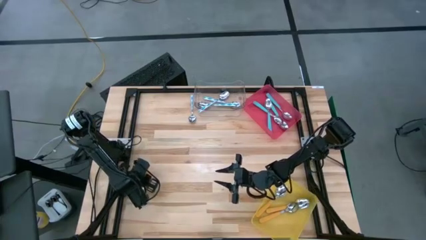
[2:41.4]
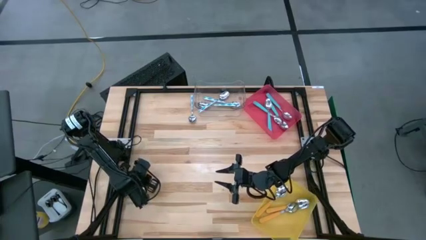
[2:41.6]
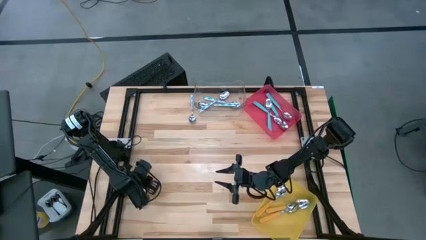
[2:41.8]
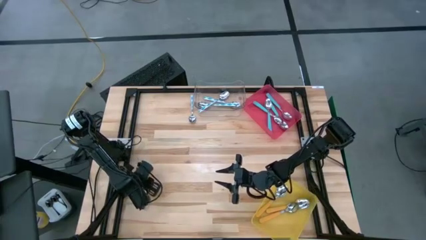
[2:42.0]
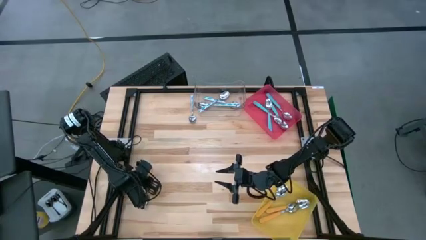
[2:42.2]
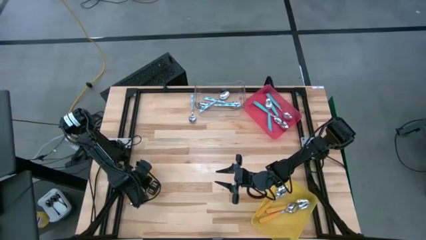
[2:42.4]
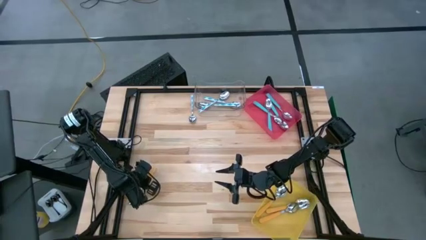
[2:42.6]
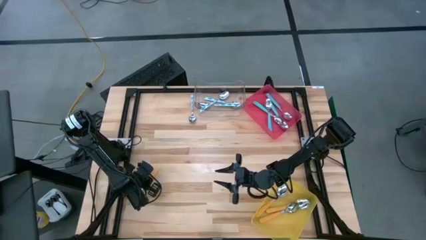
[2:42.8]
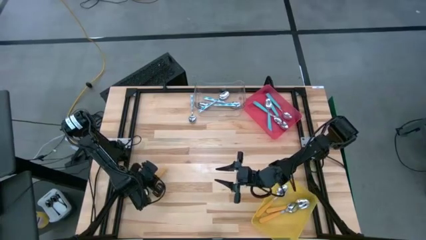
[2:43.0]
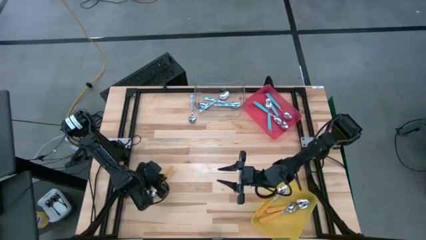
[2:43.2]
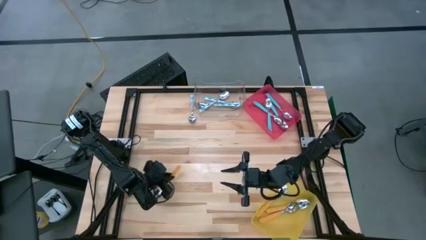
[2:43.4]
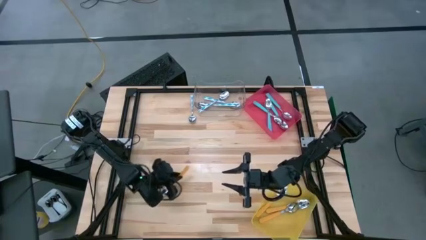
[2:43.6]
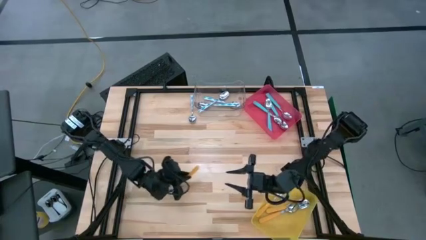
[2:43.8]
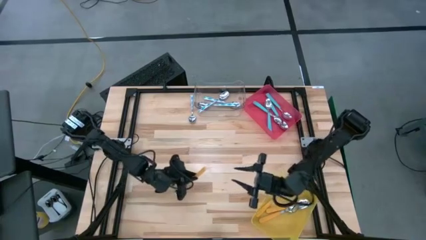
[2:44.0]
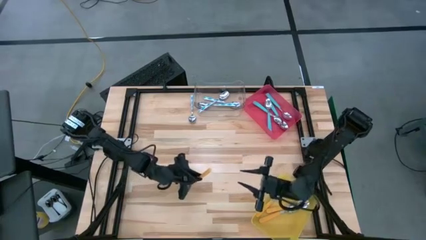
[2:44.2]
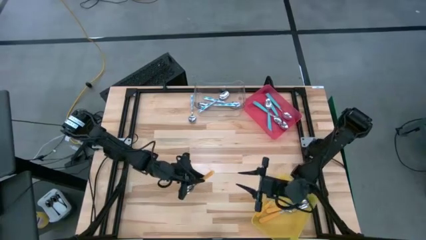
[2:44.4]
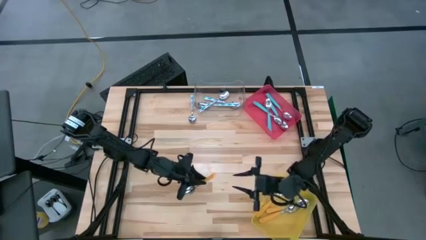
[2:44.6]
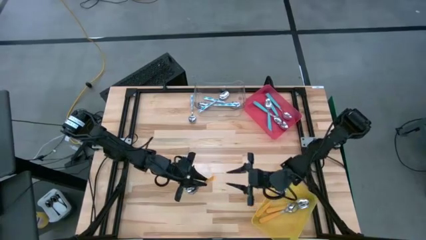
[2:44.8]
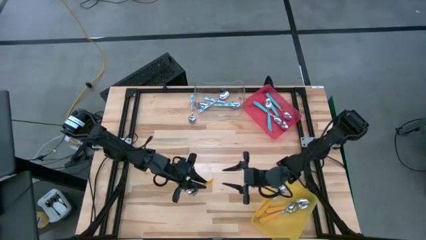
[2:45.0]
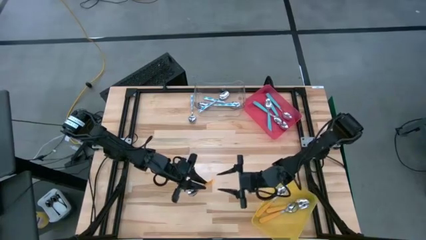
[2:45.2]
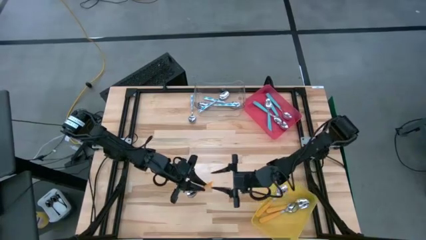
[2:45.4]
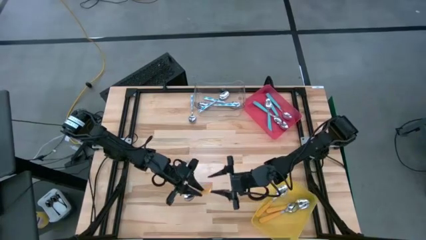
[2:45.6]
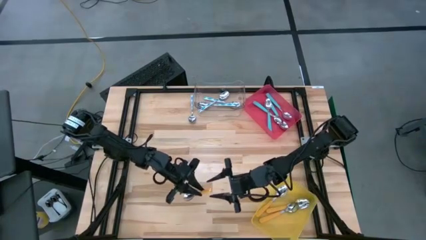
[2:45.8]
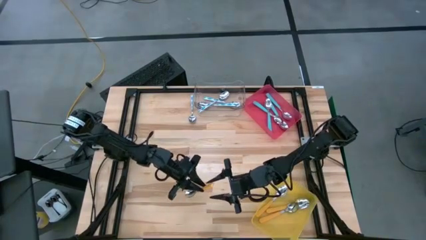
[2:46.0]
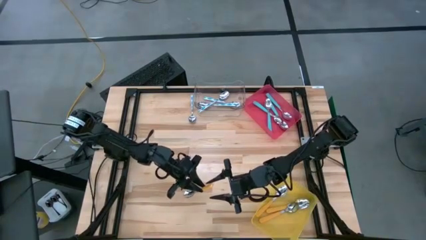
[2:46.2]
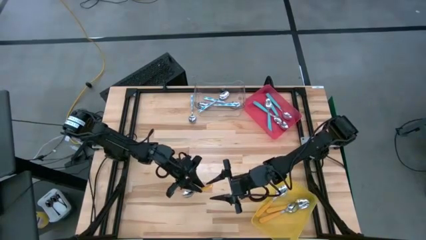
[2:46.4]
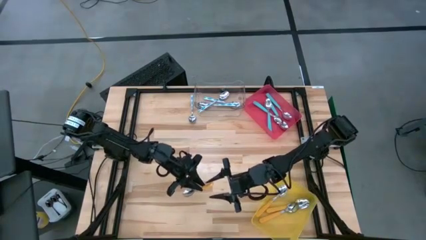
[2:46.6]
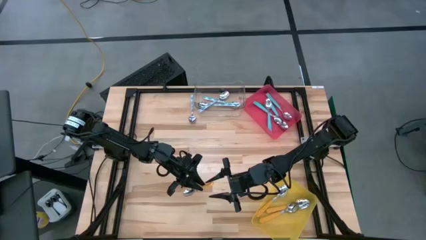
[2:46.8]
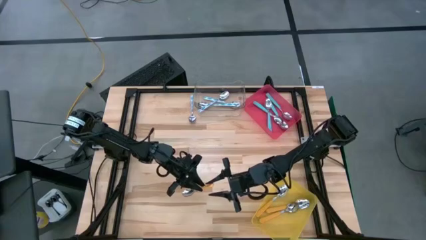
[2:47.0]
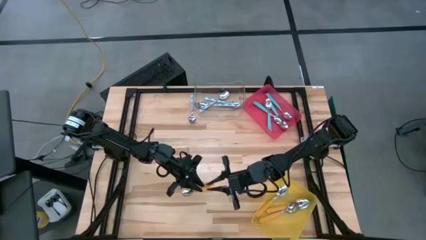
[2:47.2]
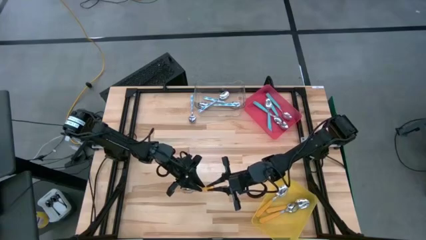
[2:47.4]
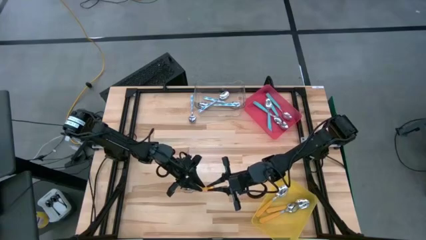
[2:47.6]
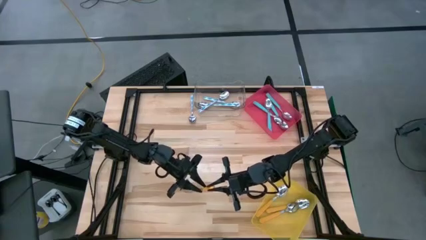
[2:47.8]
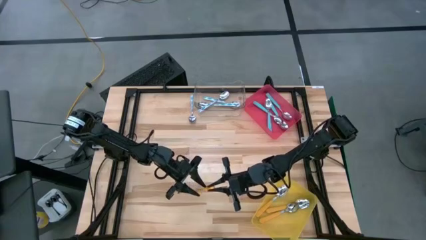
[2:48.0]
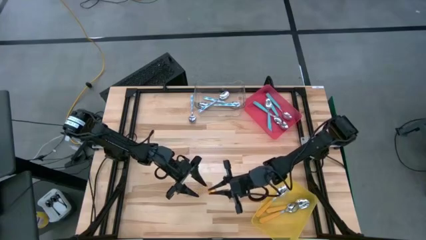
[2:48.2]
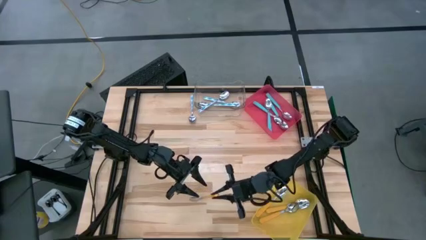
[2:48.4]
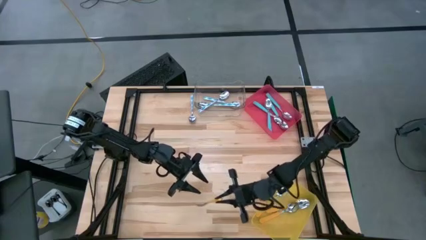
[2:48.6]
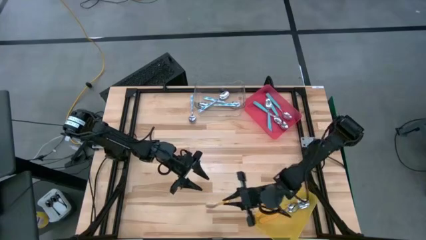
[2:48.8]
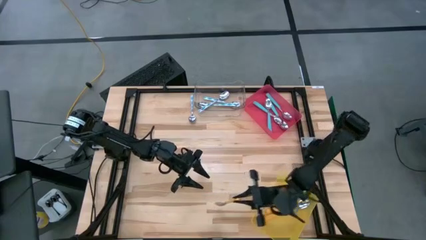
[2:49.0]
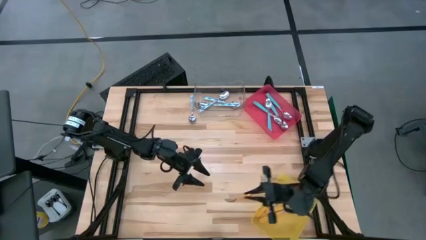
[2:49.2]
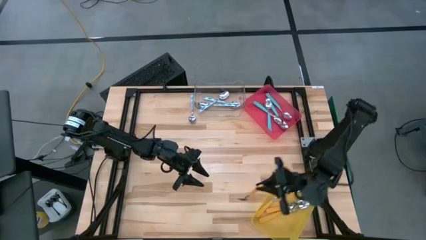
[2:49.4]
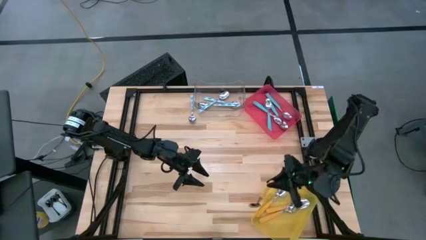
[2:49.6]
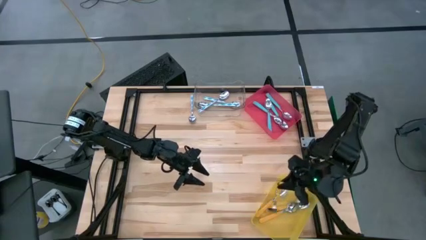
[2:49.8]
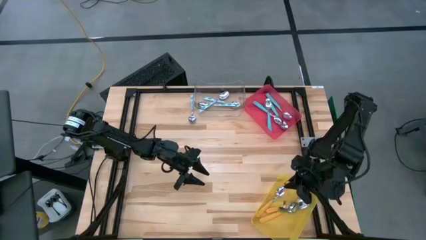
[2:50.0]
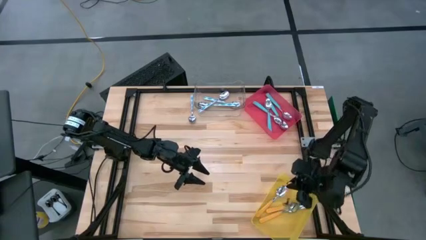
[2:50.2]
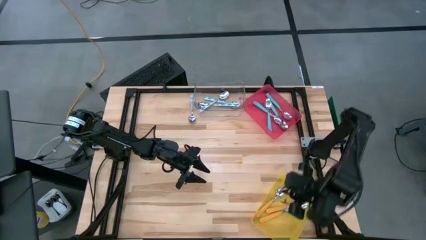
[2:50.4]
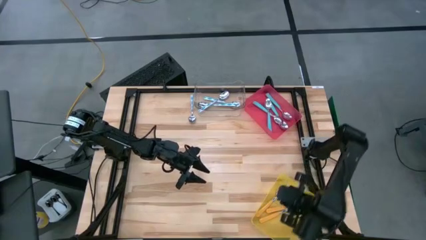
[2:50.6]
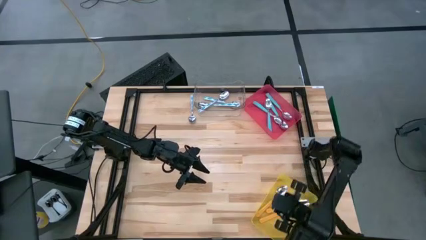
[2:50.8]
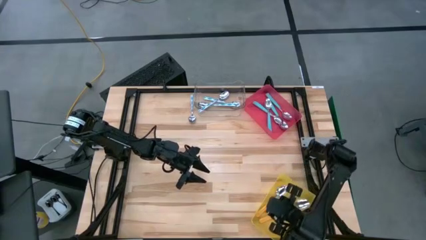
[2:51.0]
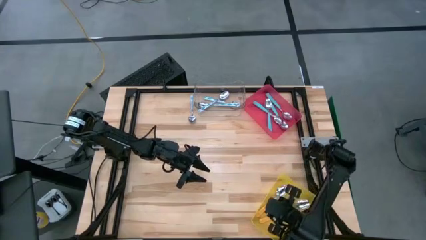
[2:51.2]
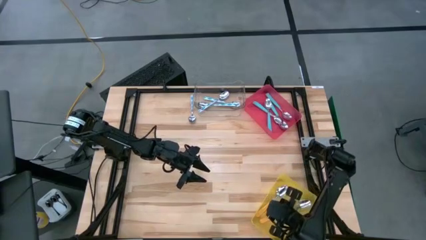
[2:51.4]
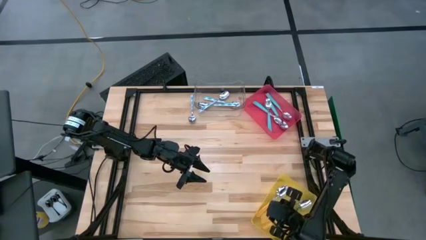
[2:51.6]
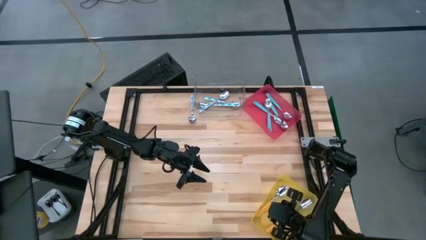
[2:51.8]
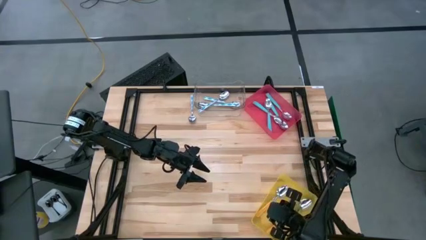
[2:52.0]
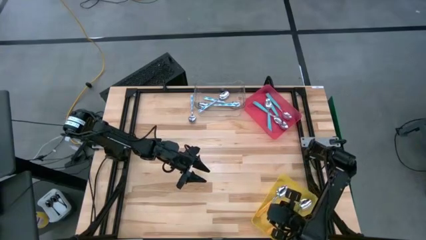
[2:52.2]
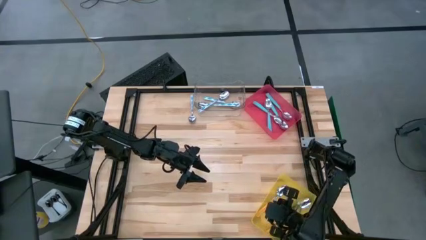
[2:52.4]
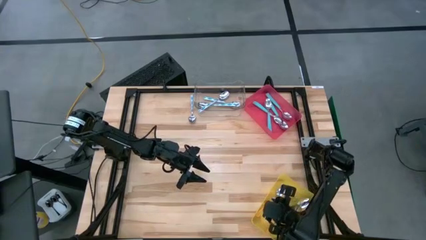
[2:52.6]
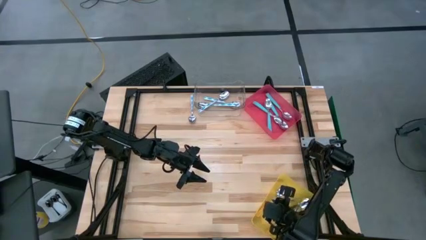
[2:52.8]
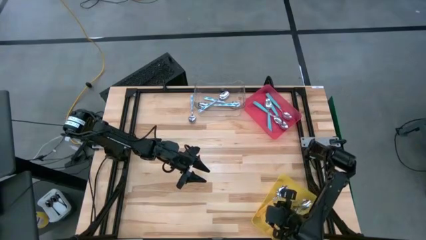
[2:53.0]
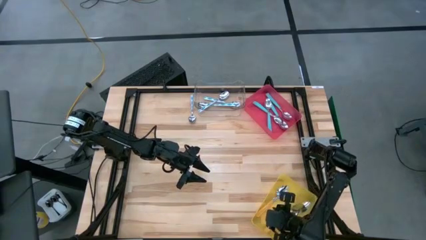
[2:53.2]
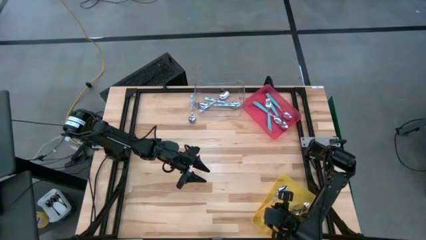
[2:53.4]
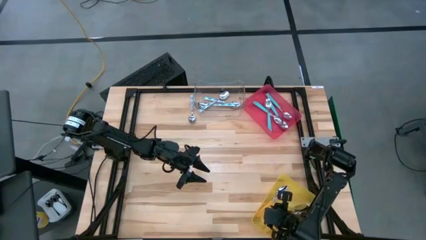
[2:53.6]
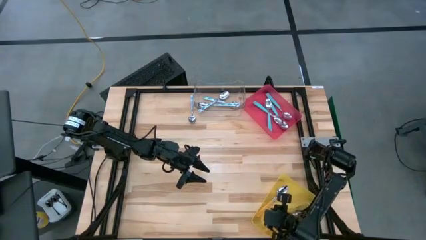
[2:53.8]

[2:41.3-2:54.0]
Task: Sort silverware by color (type)
Put the orange spoon into the yellow bin
